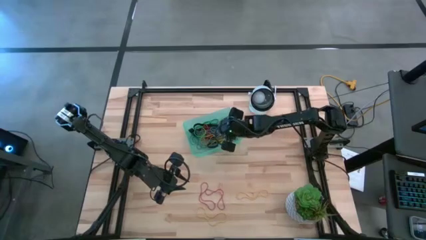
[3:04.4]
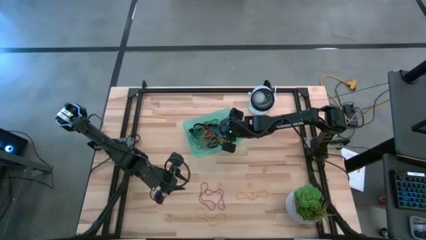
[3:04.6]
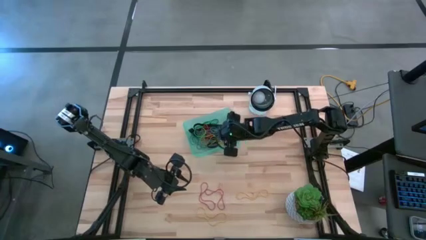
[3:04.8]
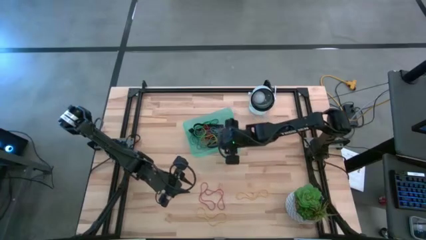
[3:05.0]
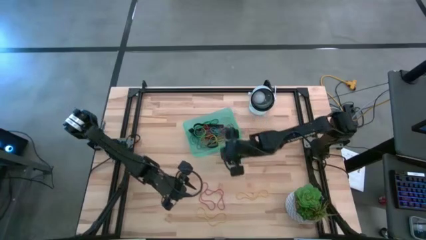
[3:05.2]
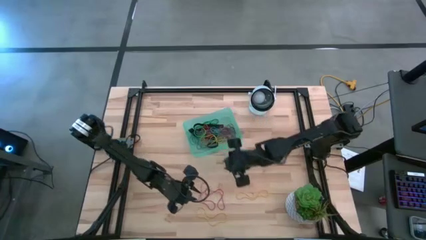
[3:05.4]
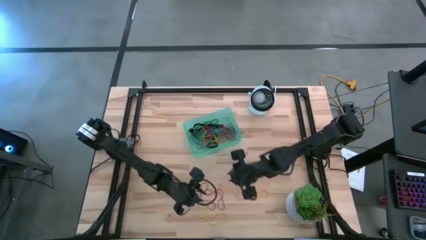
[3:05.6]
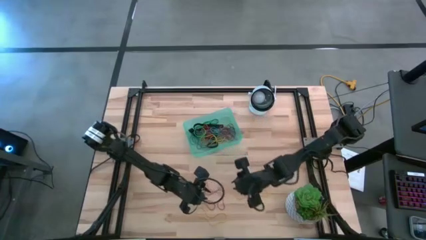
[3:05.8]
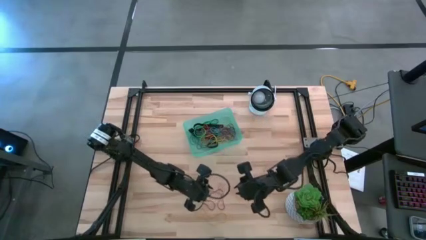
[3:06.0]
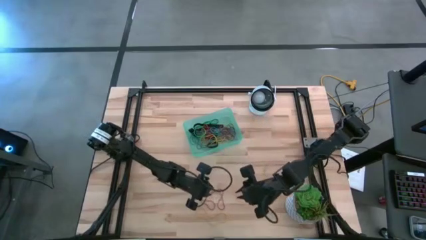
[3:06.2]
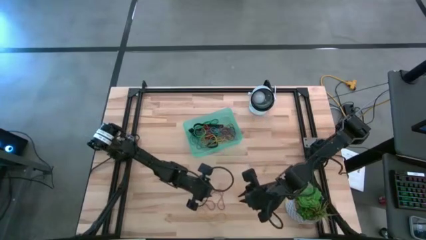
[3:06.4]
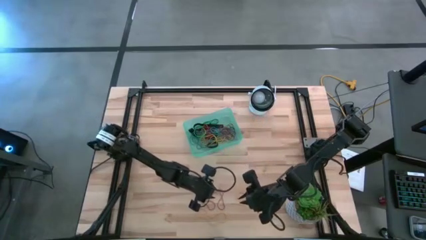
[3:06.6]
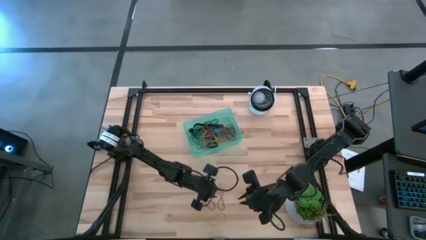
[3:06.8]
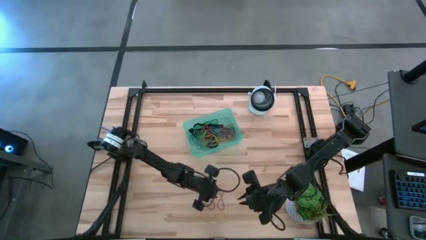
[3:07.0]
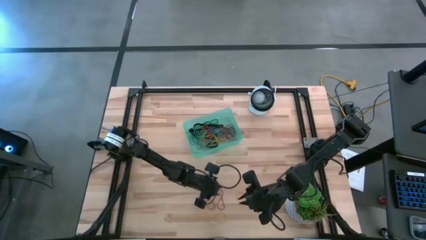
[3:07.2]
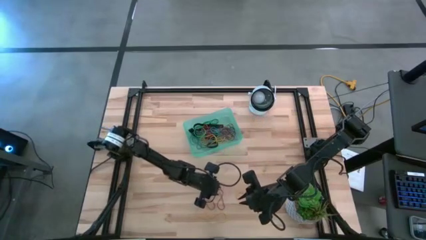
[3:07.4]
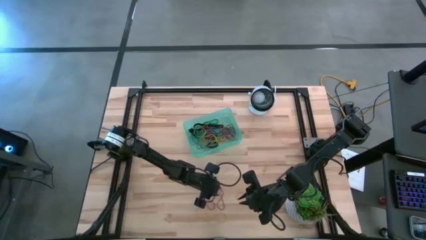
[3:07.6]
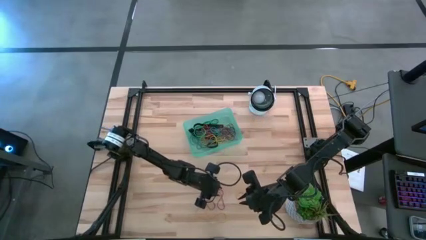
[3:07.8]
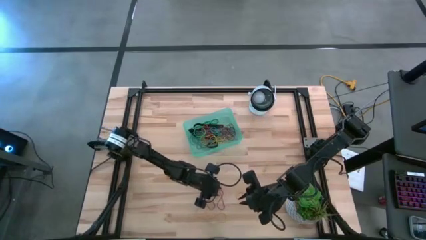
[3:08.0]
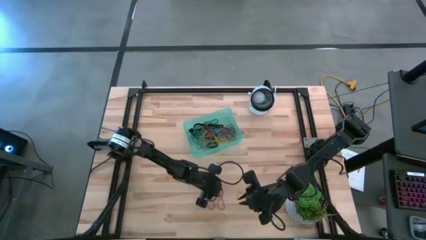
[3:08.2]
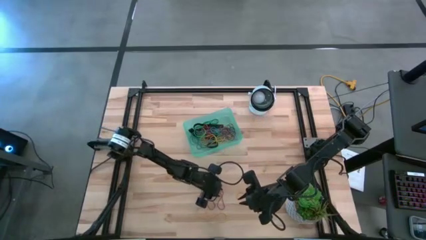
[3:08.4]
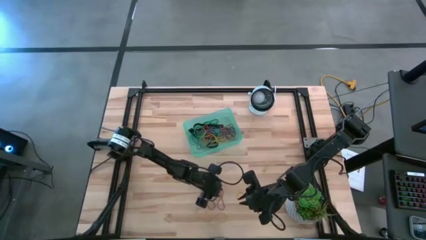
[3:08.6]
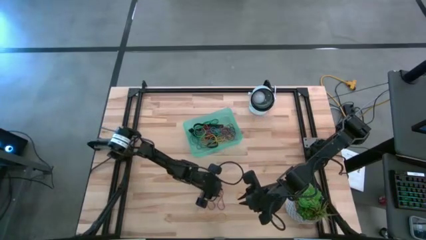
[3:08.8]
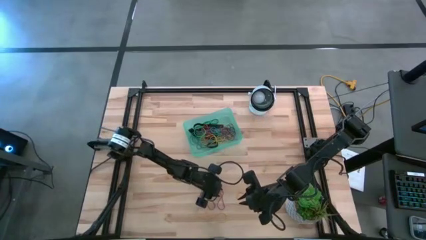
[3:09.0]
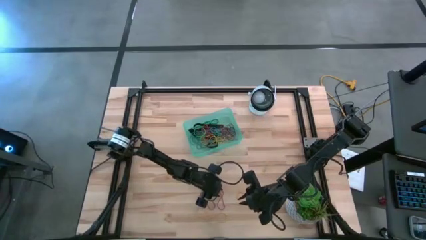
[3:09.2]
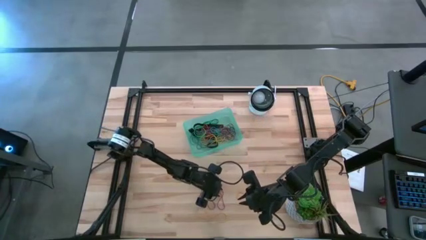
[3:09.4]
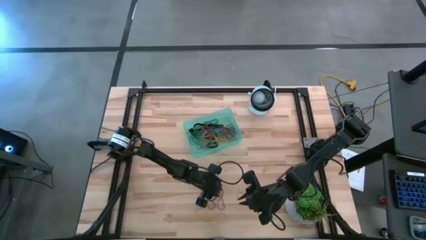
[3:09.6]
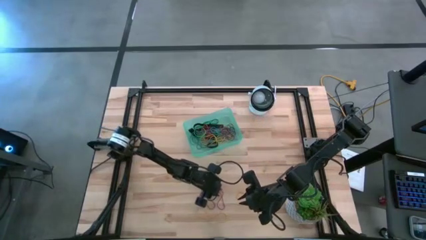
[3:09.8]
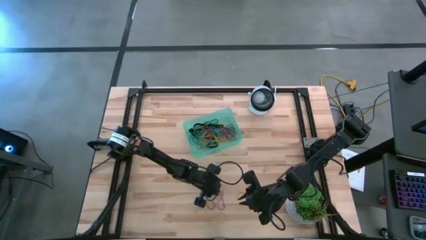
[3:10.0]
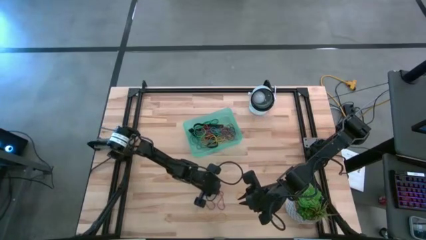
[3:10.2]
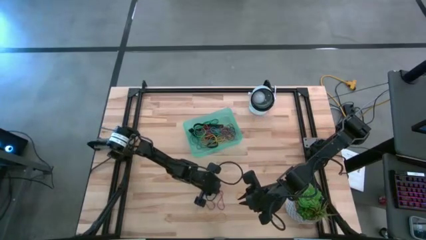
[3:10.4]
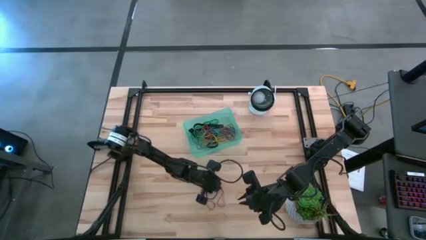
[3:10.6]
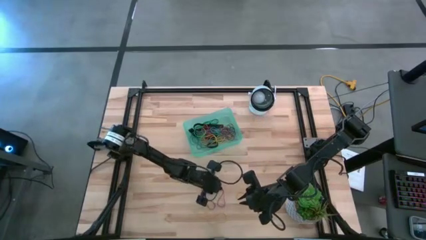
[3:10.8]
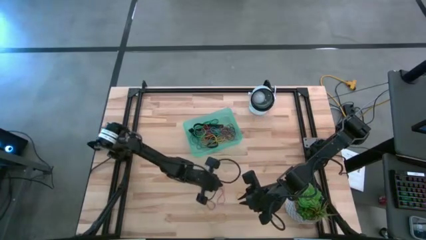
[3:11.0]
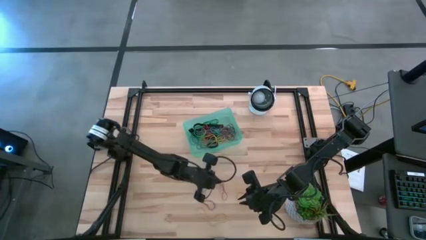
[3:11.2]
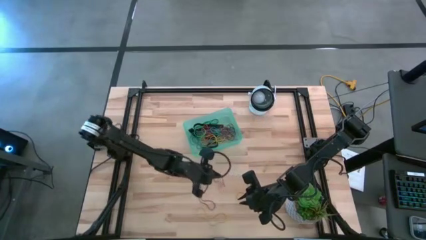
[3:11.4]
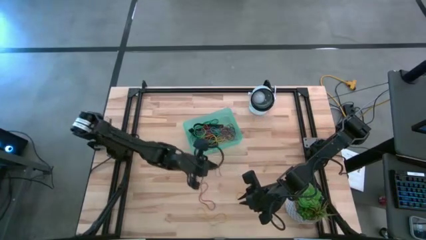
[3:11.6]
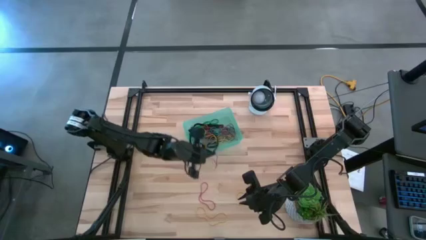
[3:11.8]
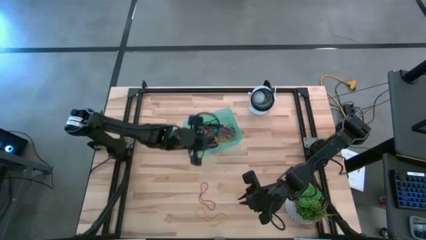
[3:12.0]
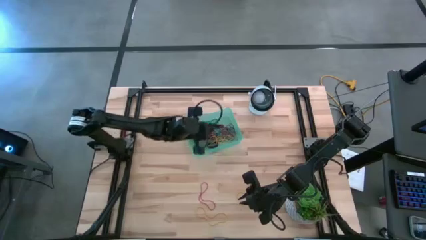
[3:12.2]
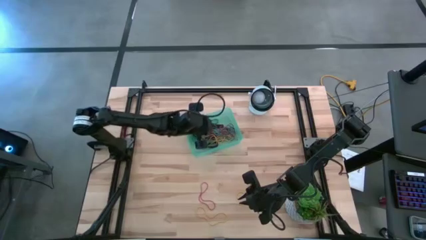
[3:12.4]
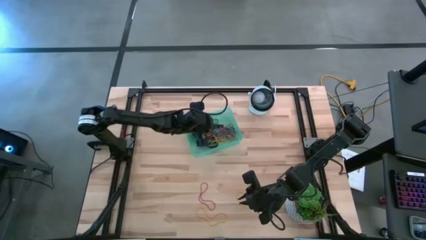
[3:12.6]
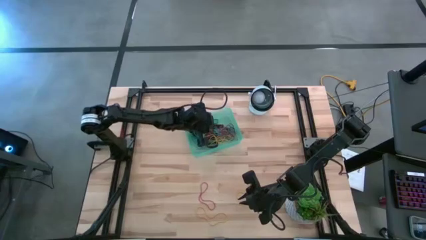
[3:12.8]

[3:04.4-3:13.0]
Task: Pick and place rubber bands into bin
Put the red rubber band into the green bin

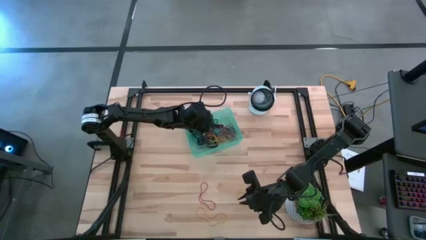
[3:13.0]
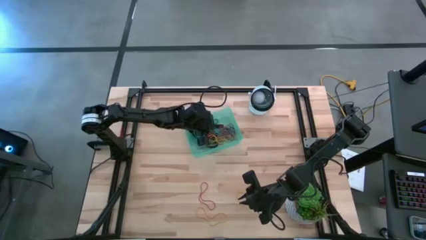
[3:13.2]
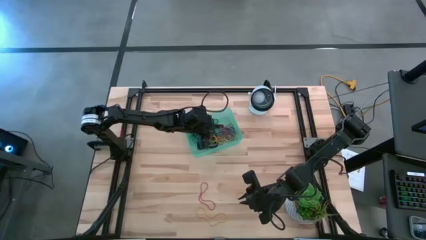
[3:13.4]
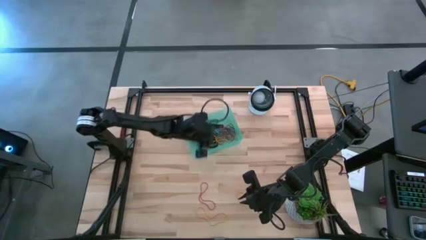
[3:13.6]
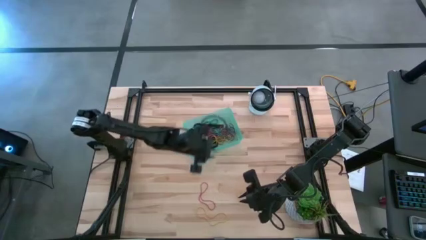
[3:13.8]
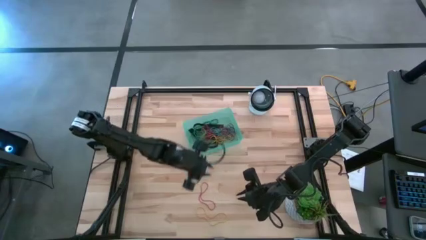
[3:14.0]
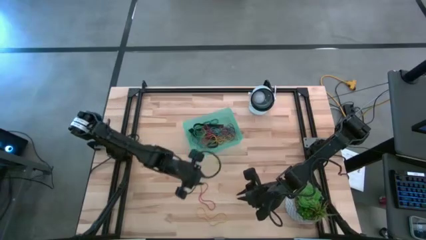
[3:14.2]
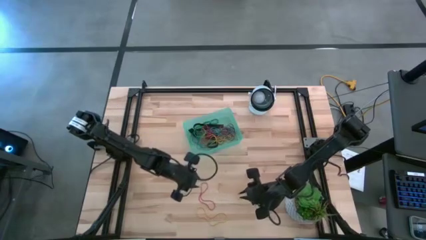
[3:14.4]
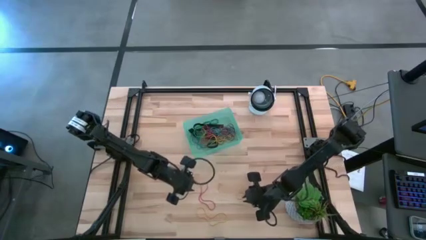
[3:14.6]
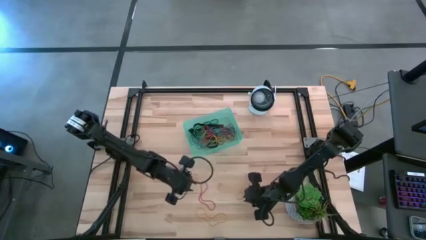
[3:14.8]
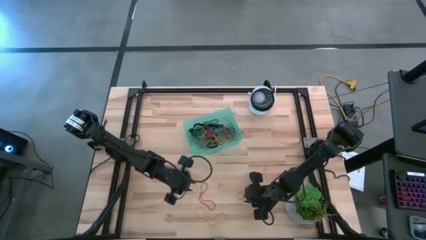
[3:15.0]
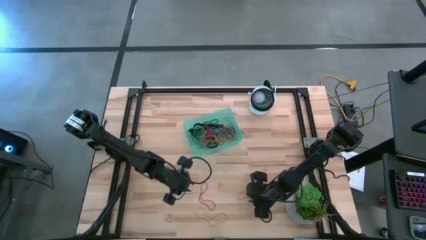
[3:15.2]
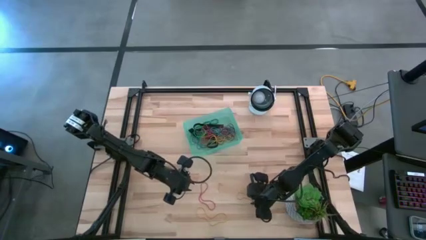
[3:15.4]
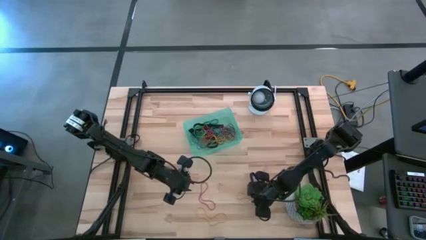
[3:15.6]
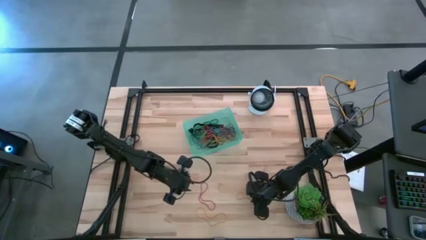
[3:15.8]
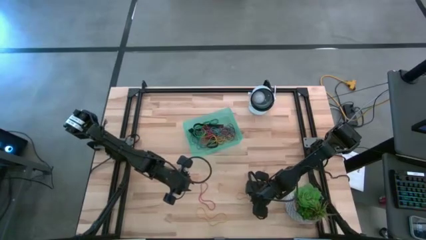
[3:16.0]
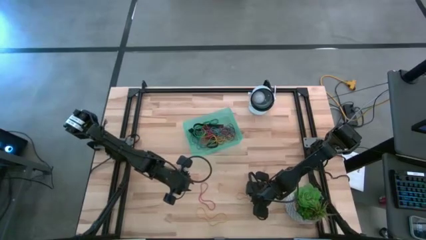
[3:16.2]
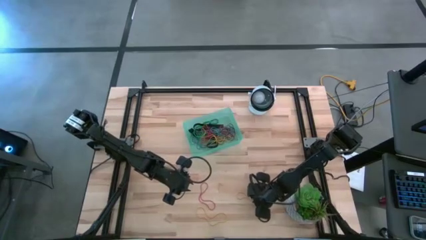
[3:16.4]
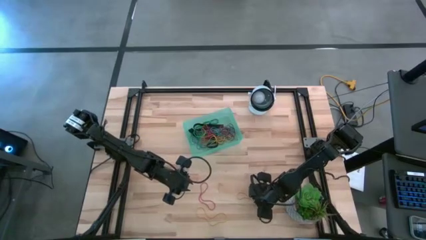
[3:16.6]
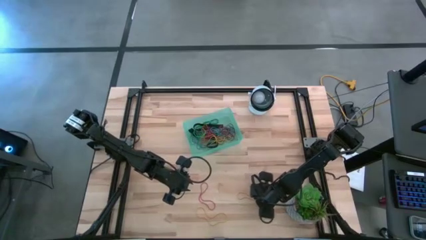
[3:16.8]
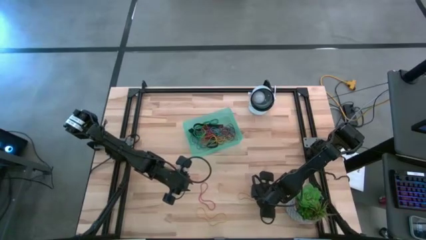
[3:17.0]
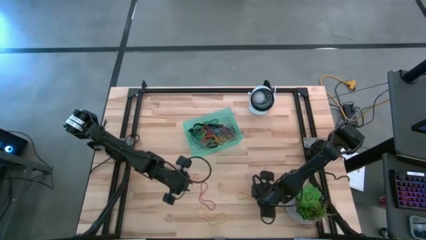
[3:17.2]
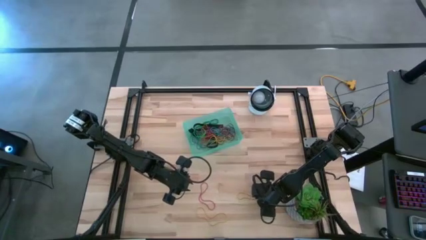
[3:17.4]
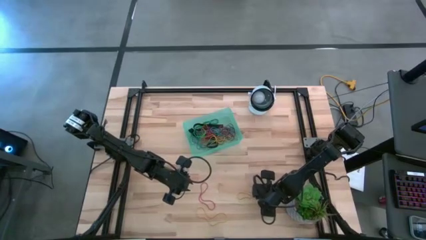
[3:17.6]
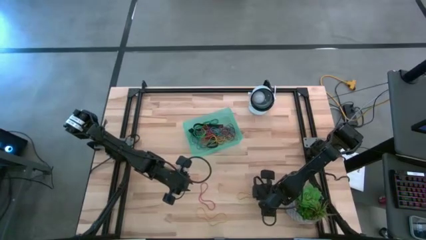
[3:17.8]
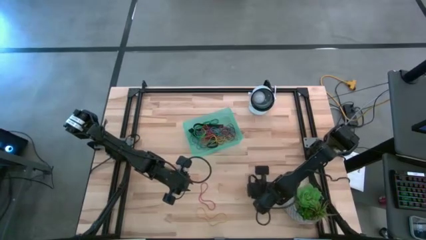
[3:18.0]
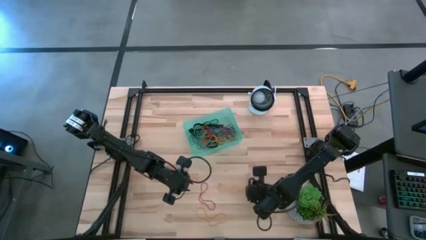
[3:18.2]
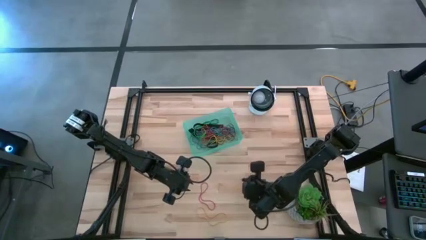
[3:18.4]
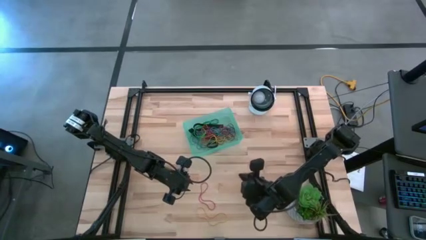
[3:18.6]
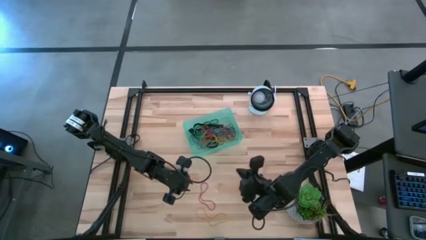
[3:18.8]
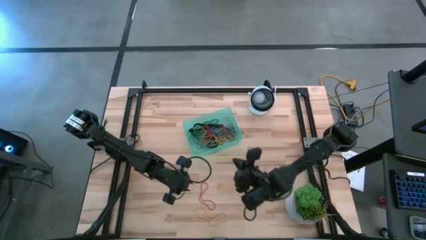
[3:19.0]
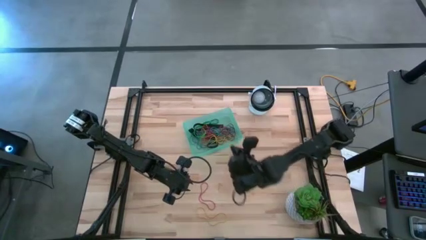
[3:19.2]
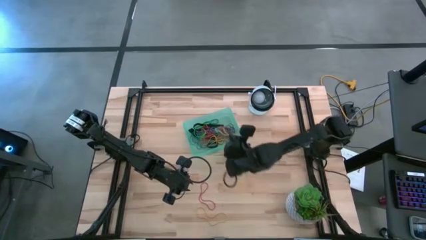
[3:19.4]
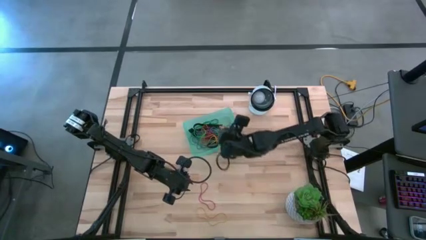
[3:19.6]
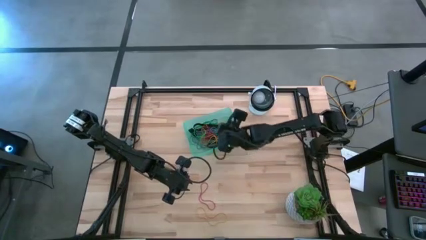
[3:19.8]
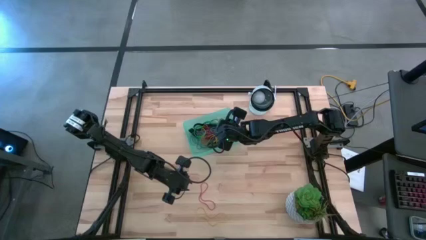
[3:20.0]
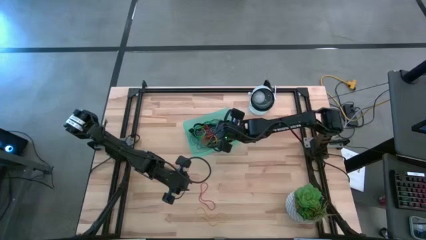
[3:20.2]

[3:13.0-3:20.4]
Put the yellow rubber band into the green bin
